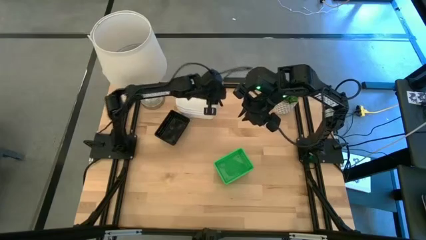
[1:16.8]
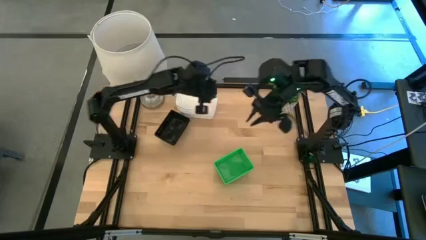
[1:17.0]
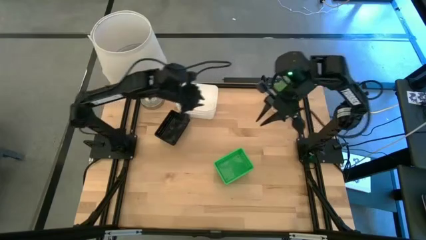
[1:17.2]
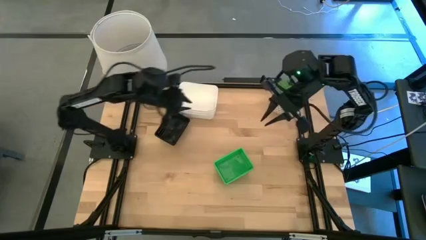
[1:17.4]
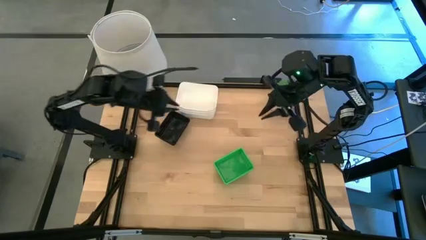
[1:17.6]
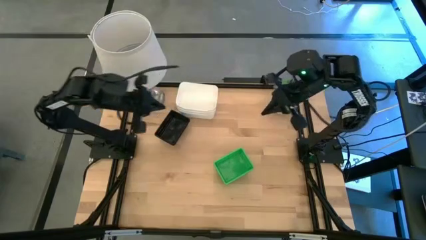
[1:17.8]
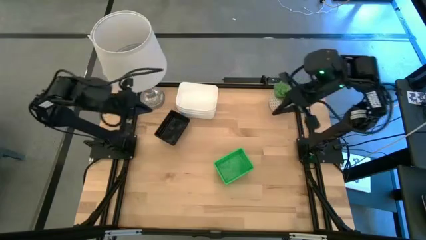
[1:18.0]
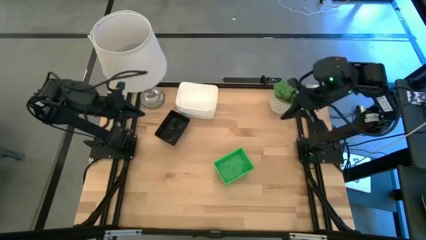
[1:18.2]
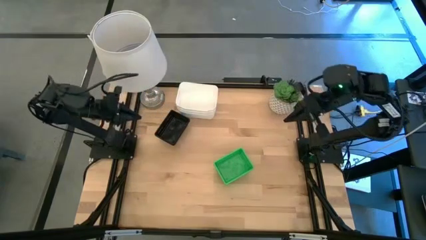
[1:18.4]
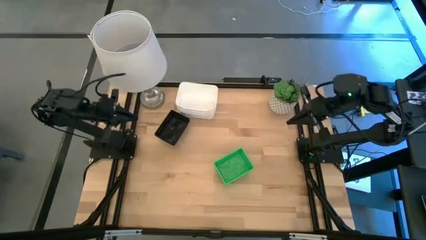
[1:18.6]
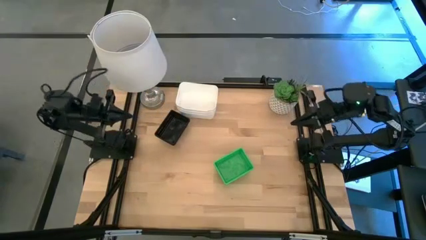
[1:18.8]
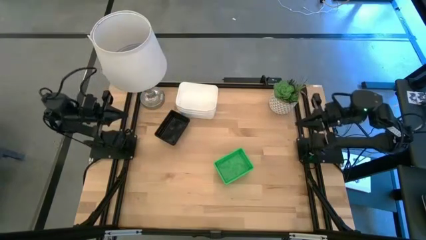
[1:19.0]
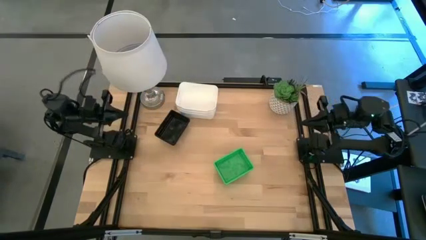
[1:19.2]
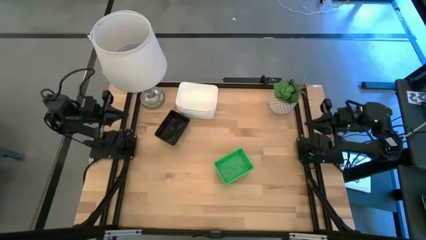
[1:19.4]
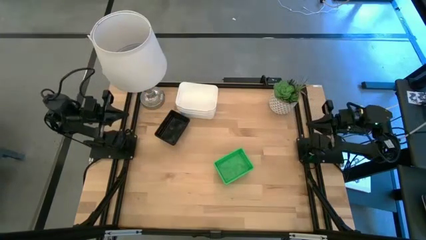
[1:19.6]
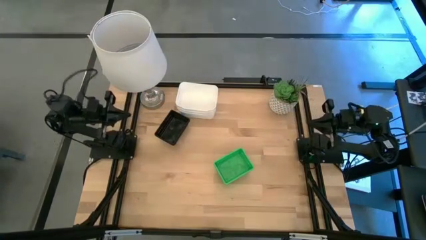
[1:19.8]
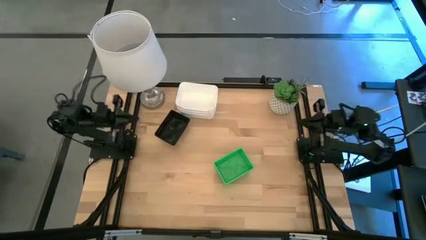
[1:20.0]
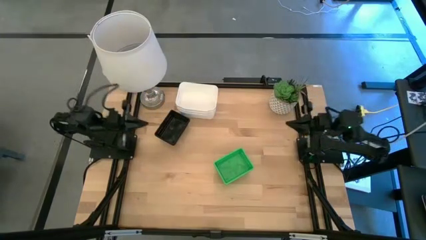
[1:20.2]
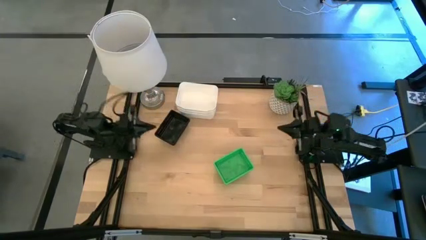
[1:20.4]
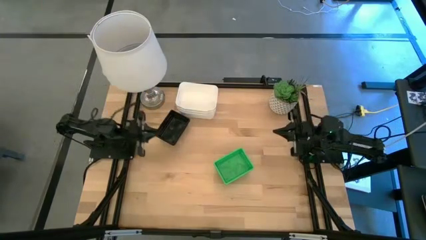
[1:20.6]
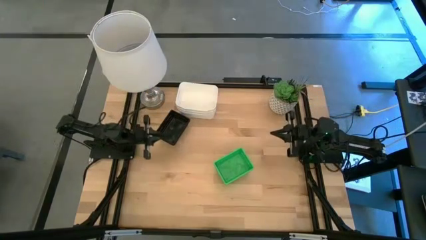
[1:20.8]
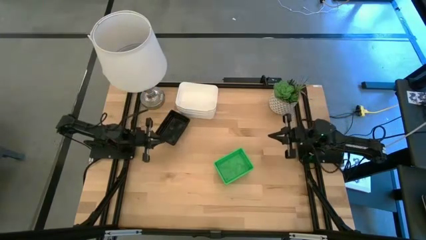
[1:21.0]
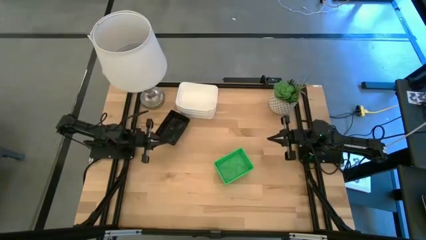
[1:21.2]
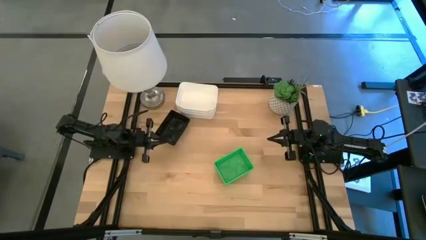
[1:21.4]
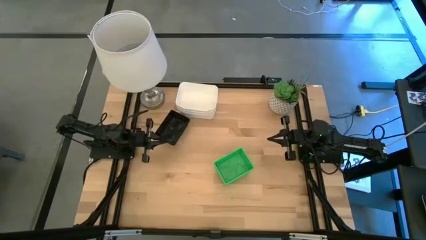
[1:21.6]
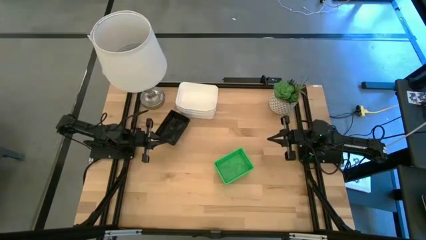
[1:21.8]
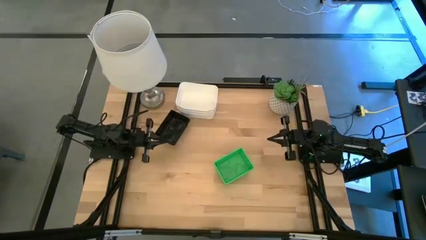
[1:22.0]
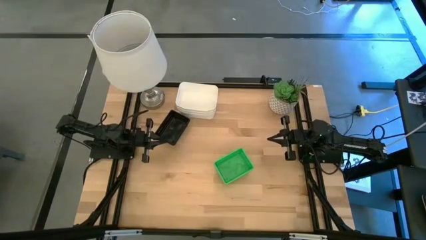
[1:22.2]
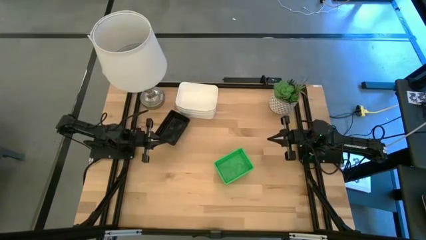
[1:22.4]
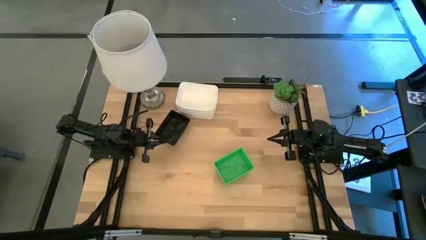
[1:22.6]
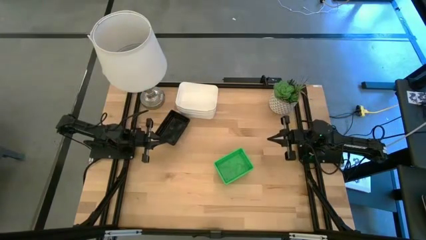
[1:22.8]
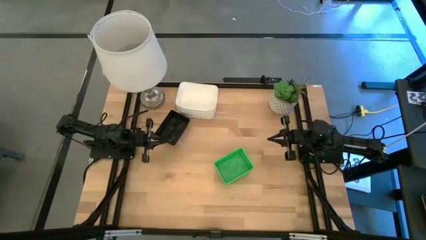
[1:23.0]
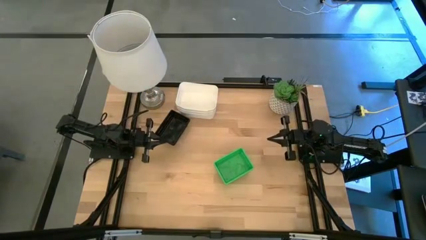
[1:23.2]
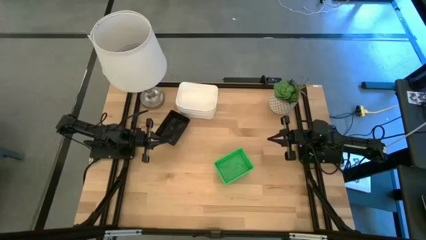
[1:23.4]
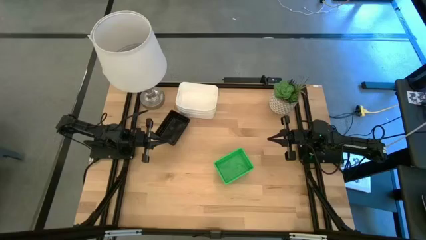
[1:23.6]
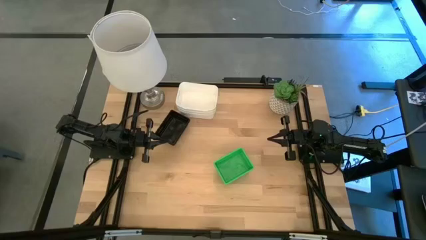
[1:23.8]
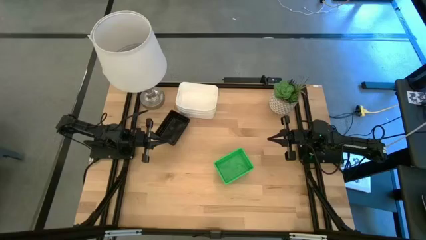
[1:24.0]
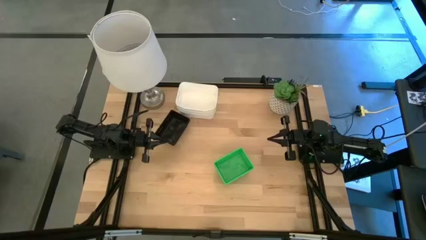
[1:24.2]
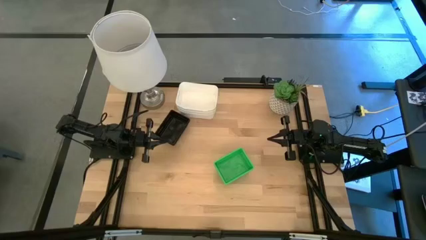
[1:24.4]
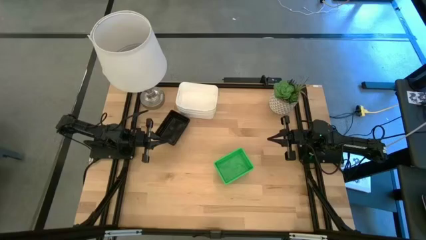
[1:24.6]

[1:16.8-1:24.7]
Return to Home Position
